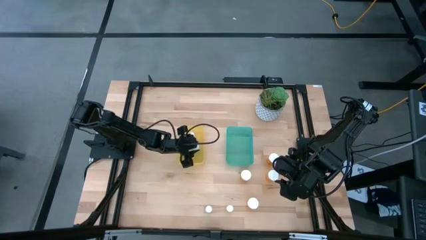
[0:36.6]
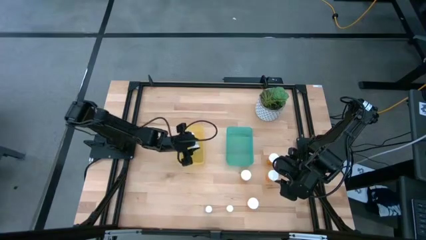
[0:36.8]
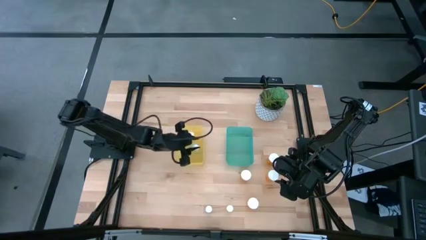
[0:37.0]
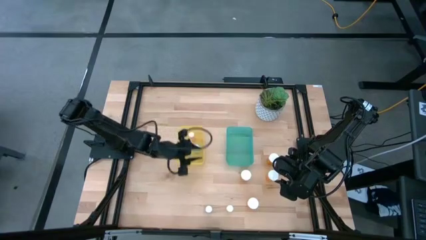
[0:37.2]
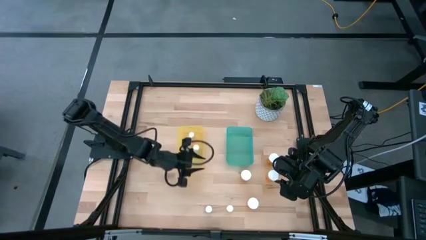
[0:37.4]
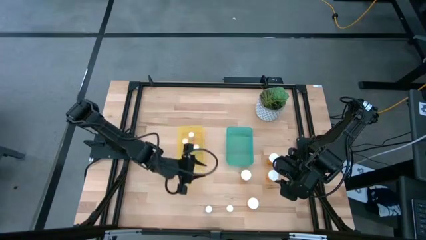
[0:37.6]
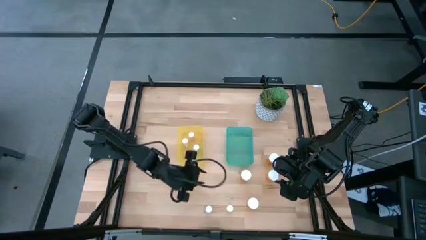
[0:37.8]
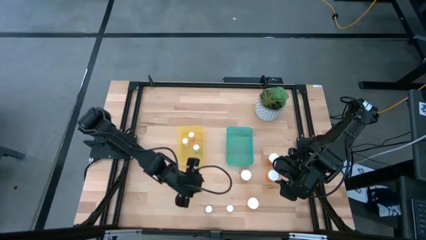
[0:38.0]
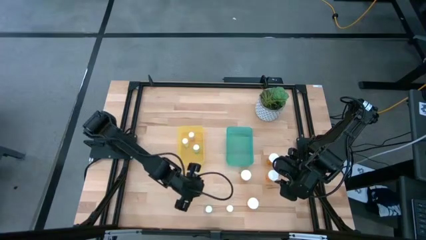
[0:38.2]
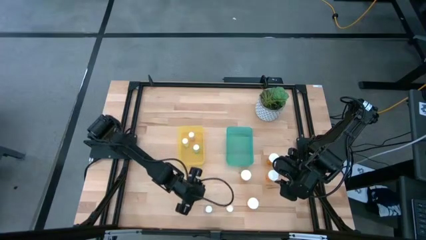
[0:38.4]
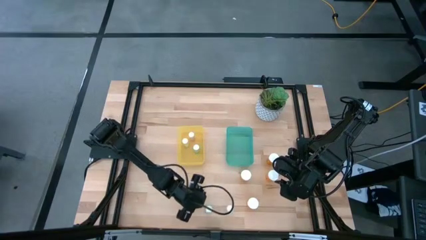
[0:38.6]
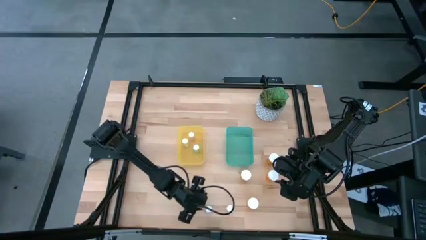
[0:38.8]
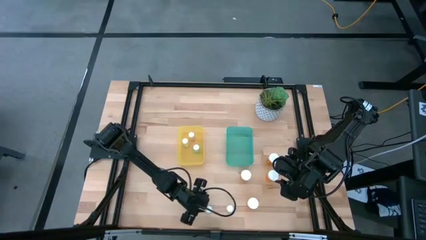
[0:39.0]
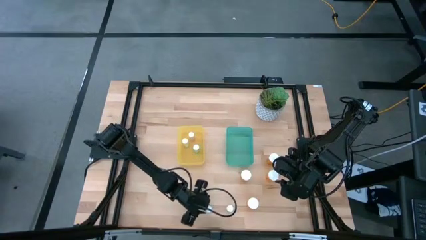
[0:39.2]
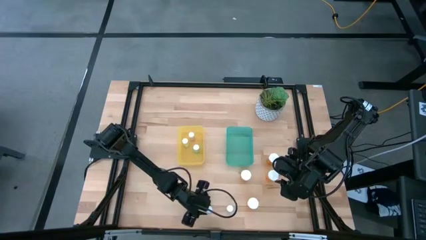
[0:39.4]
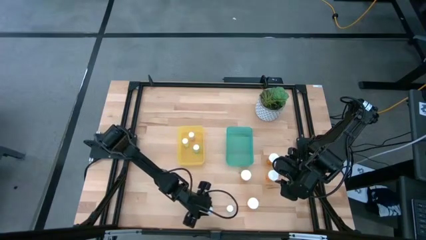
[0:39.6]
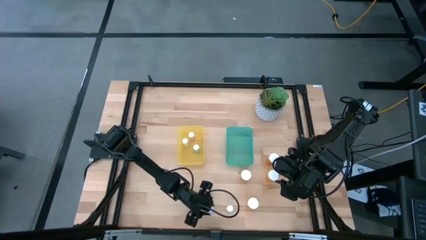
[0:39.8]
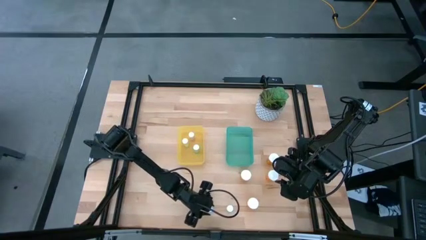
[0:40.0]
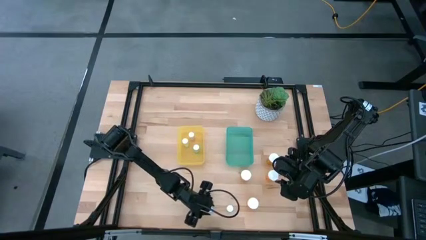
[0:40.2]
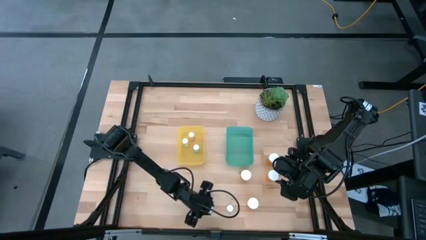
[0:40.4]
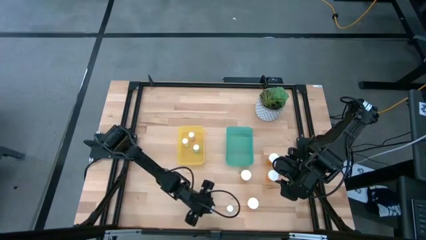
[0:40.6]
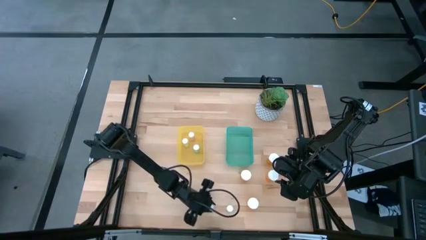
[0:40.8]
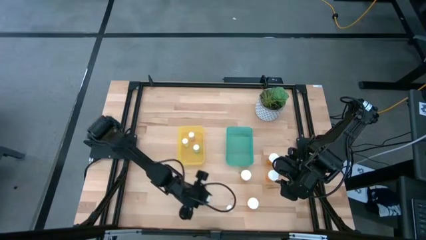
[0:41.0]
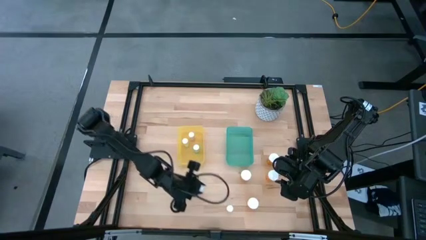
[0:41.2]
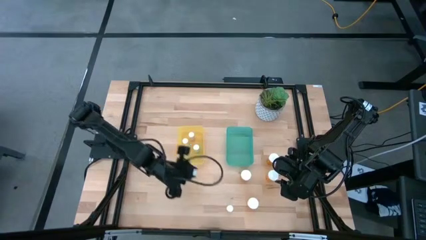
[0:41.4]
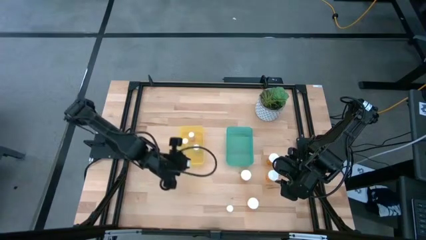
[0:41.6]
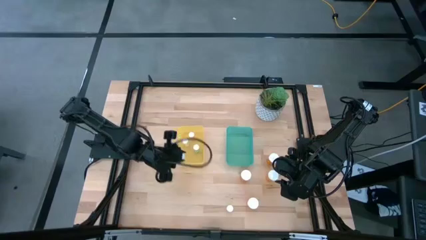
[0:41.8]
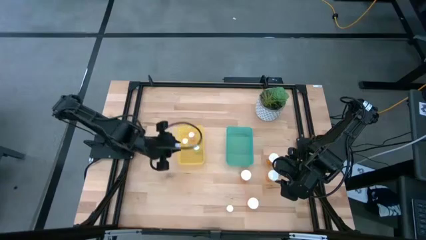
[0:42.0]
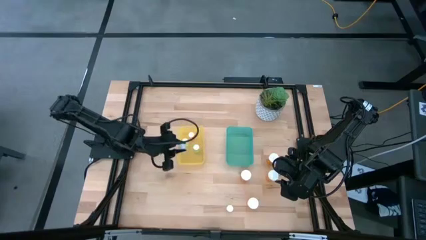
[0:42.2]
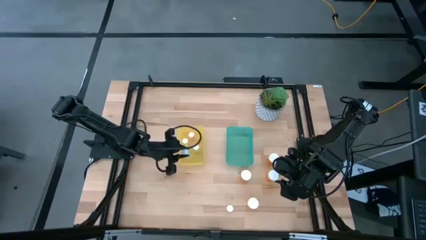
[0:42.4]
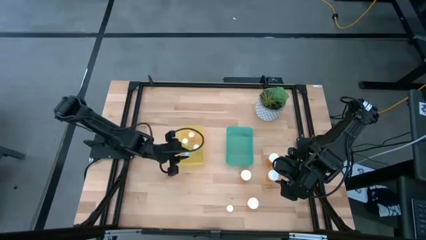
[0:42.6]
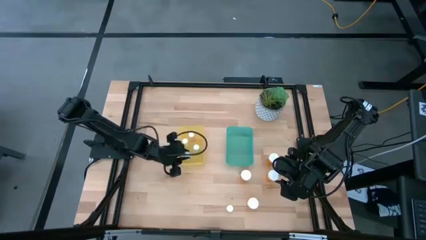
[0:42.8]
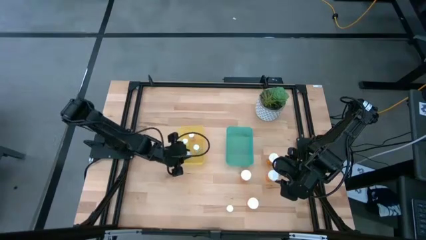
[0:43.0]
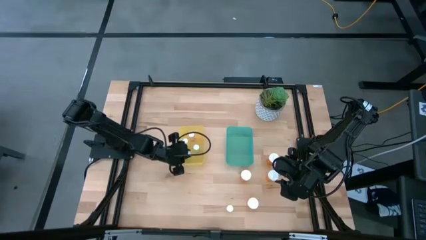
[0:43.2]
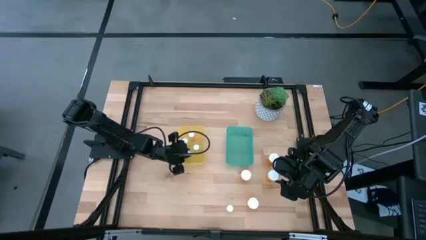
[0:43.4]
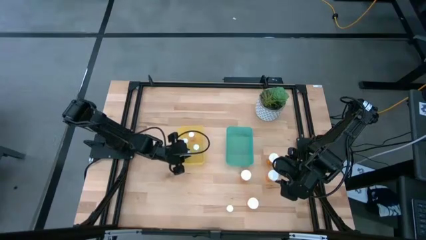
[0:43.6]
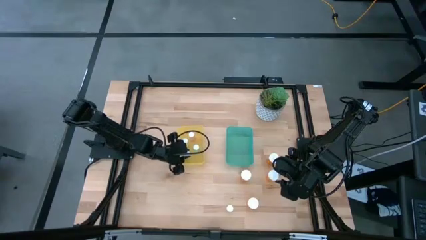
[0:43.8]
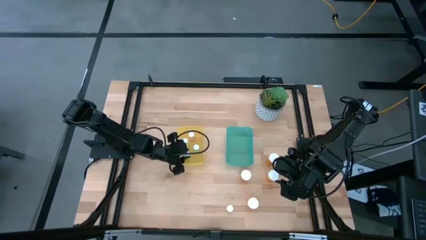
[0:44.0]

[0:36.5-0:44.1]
Task: Pick and place medicine bottles into bin by pill shape (circle, oval)
Put the small blue pill bottle into the yellow bin

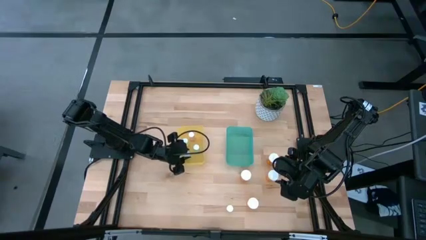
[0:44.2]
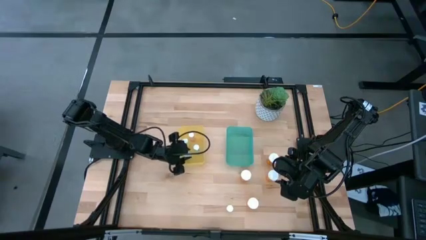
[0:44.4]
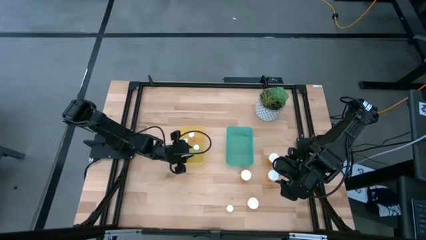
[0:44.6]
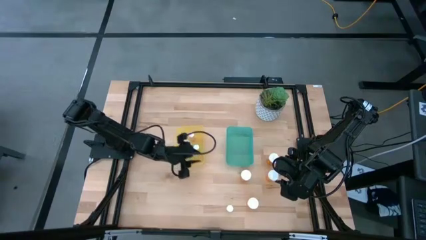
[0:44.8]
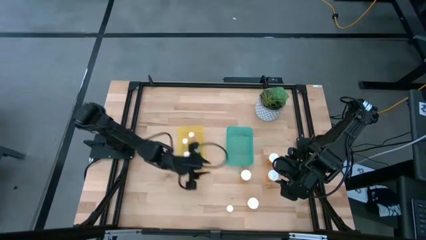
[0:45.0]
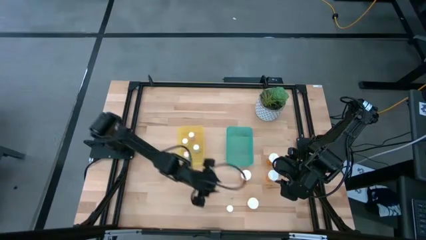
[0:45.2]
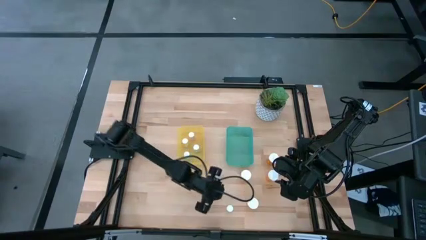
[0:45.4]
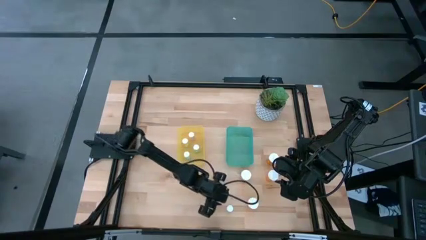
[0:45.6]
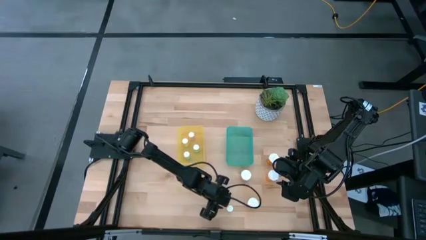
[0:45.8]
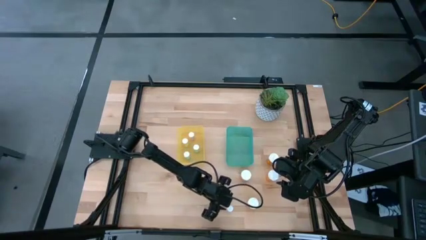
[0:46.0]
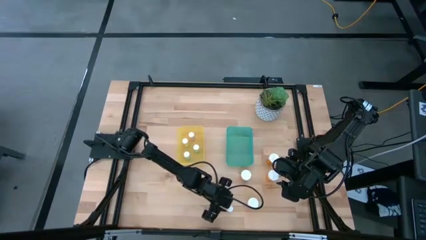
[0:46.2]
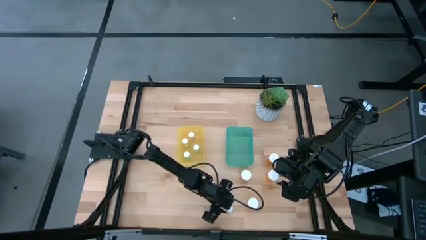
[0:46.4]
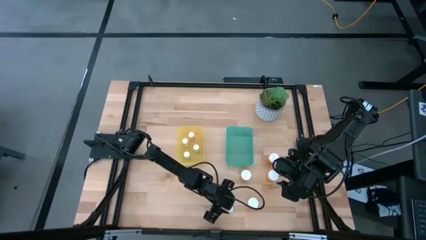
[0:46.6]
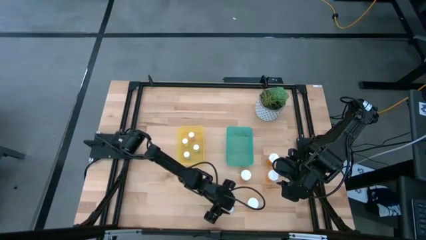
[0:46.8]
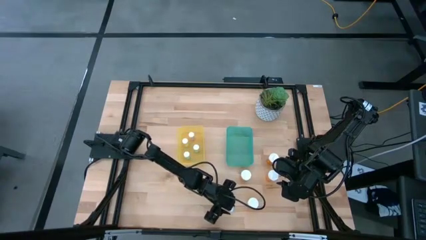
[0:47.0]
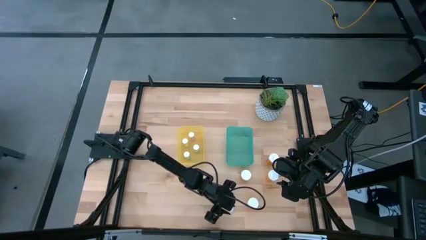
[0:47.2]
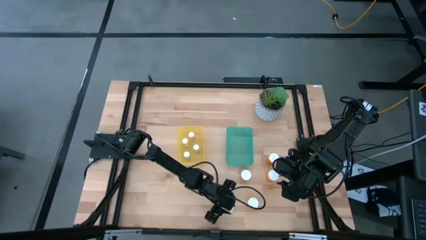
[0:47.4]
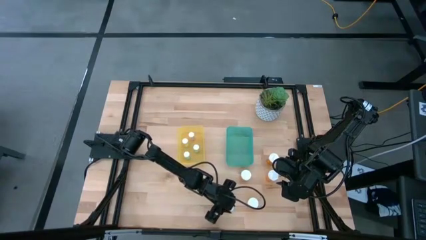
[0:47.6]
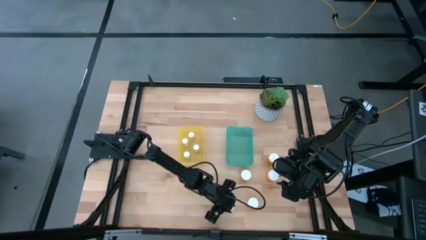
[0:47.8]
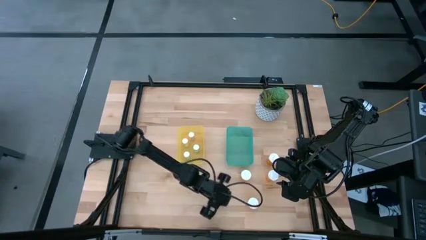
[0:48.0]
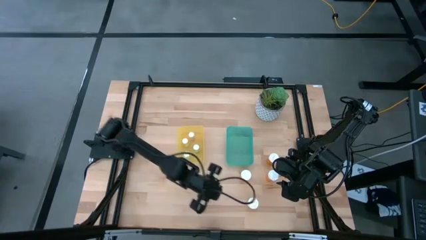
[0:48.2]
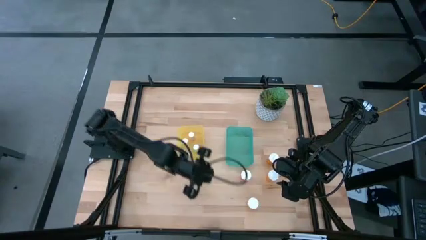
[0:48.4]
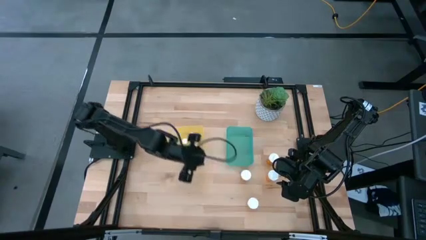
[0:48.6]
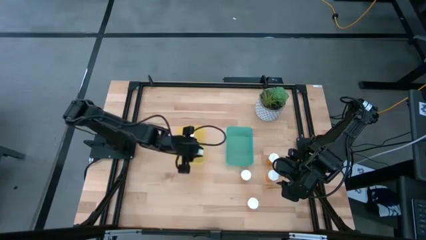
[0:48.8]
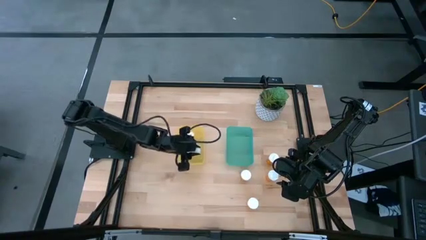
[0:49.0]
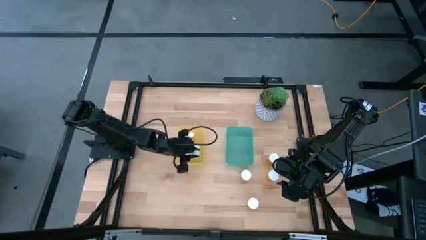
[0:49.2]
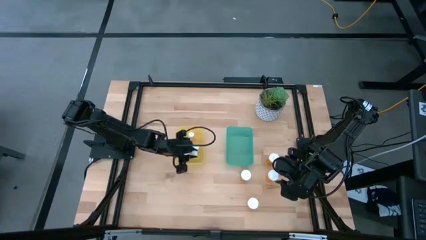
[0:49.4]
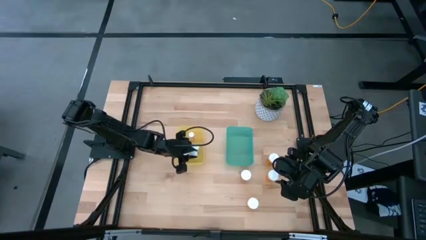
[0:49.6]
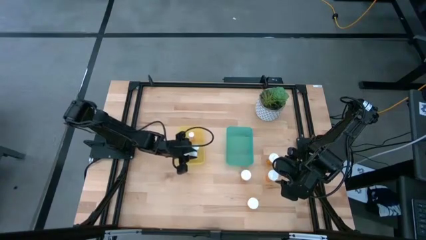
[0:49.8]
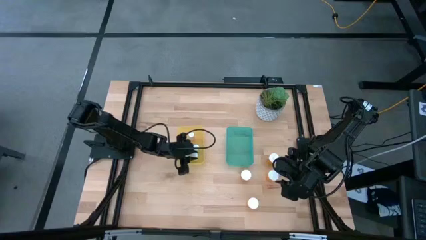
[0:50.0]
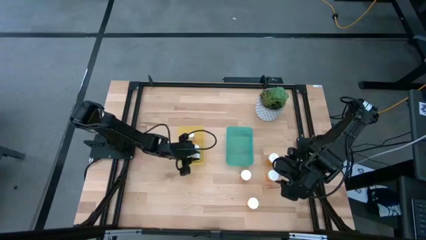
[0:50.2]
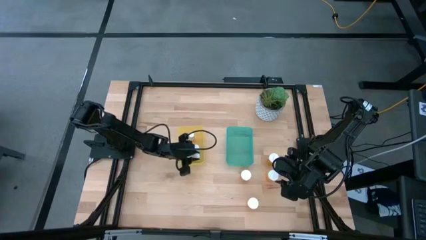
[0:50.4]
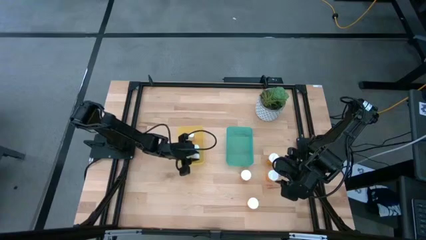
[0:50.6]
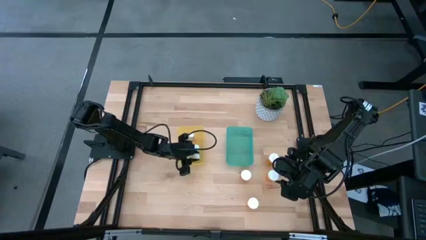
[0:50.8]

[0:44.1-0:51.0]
Put the small yellow pill bottle into the yellow bin
